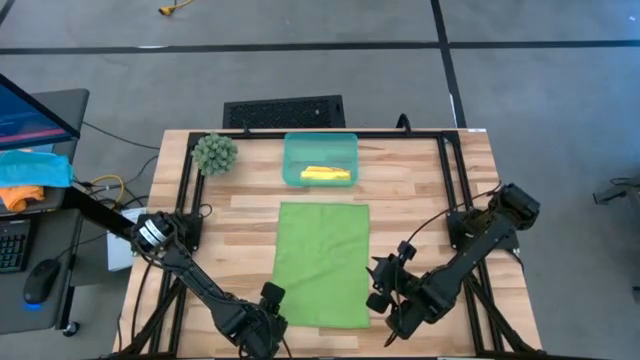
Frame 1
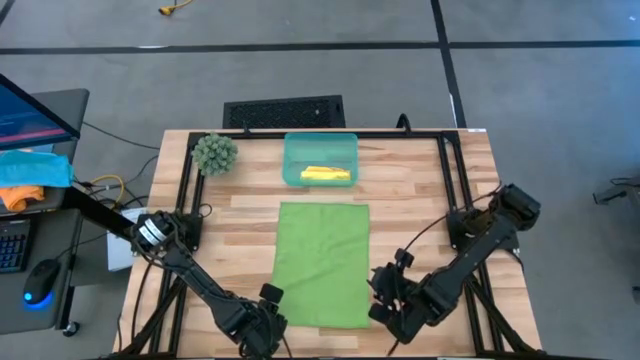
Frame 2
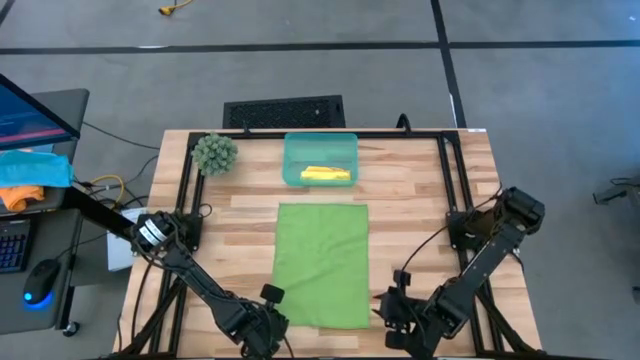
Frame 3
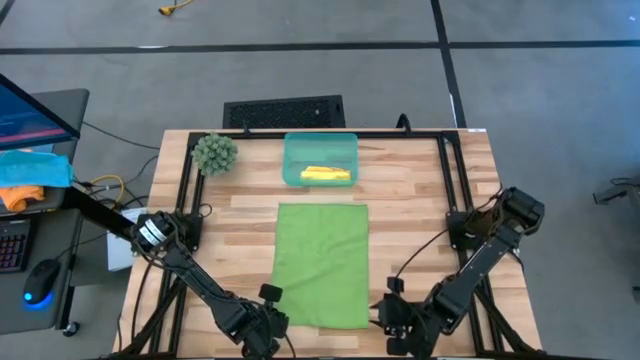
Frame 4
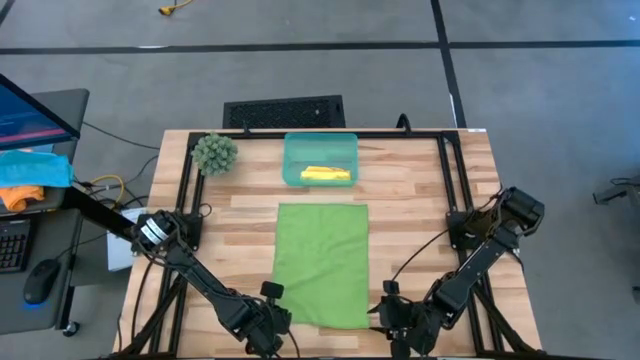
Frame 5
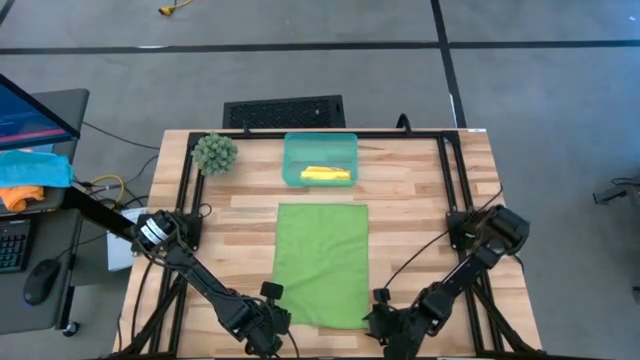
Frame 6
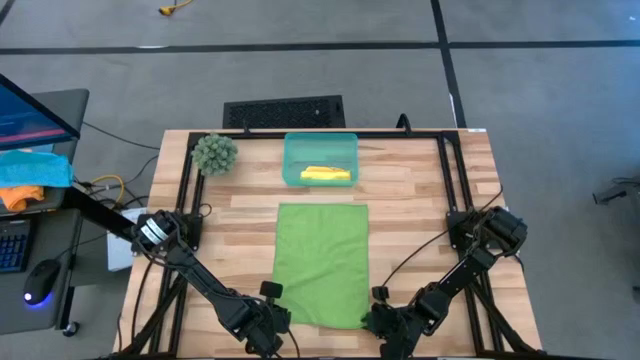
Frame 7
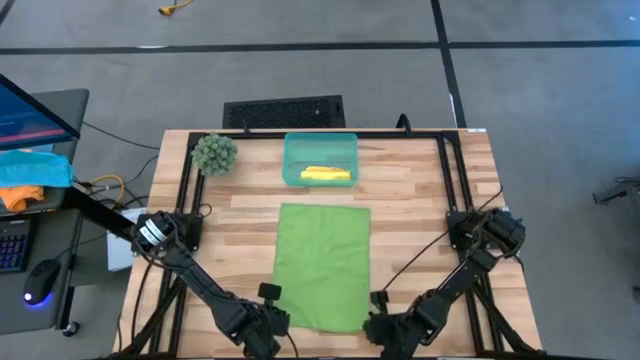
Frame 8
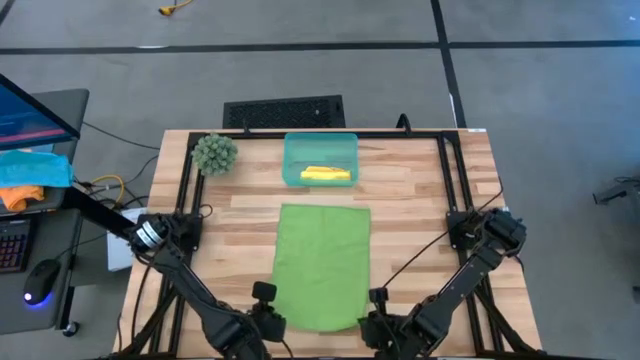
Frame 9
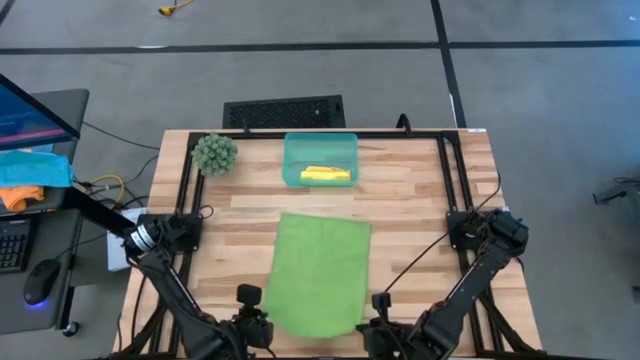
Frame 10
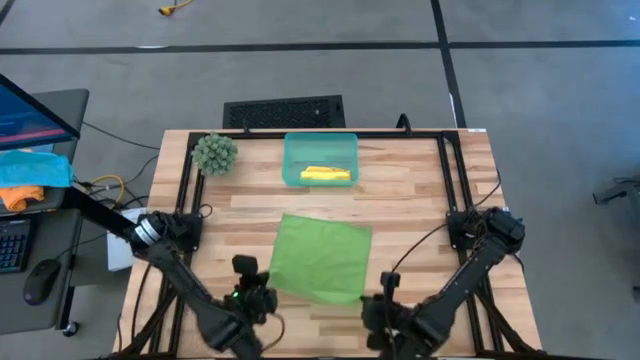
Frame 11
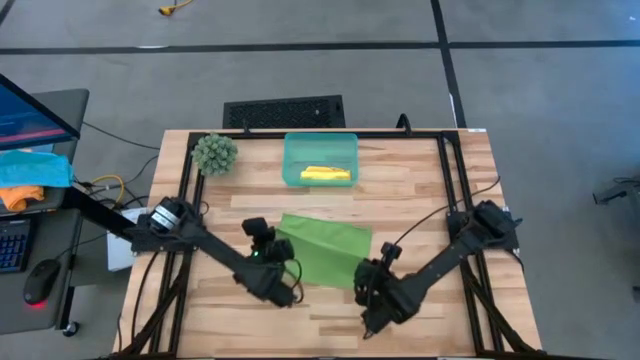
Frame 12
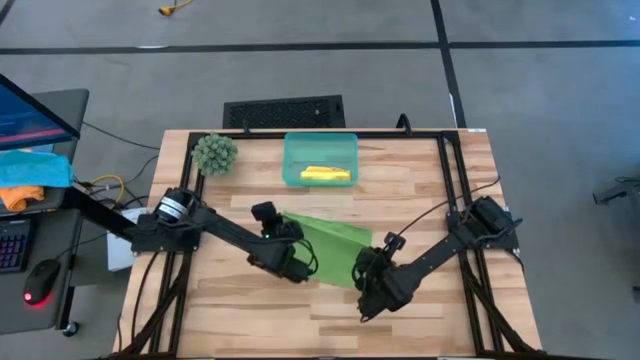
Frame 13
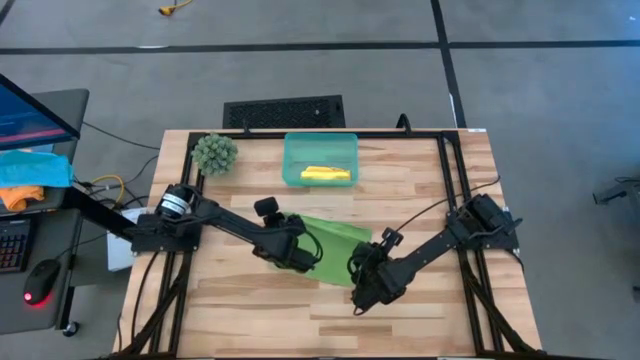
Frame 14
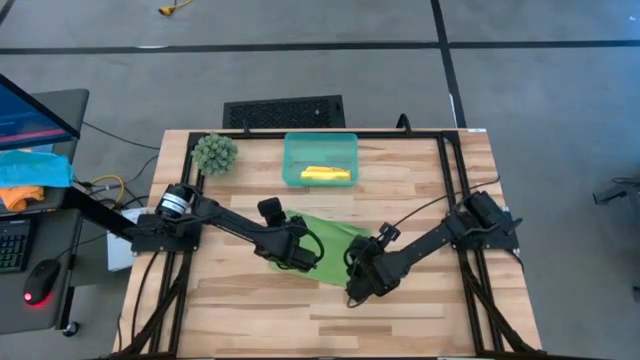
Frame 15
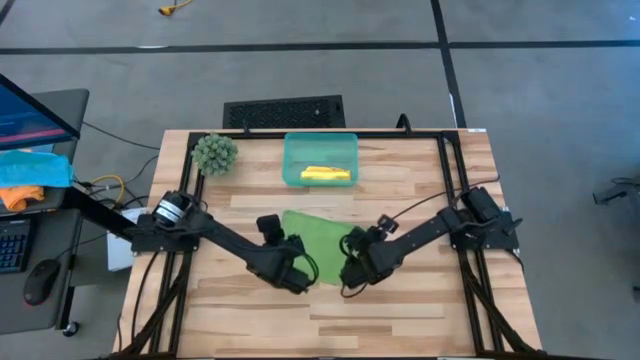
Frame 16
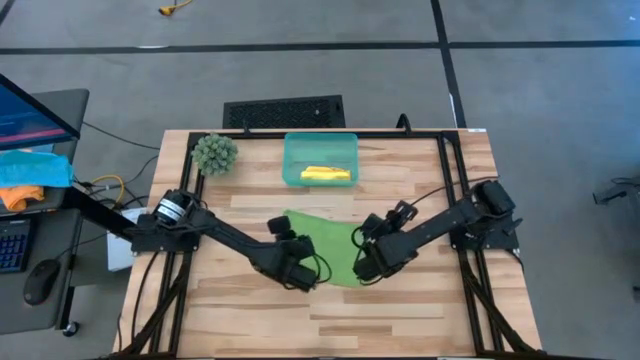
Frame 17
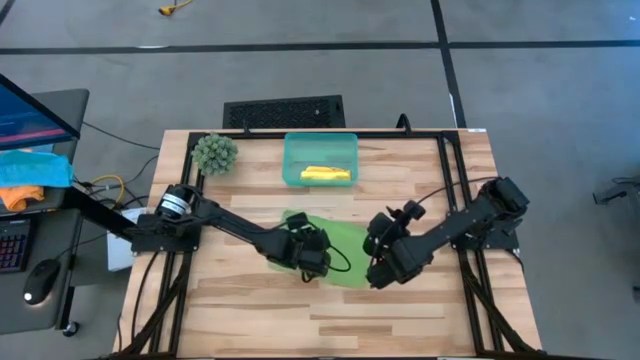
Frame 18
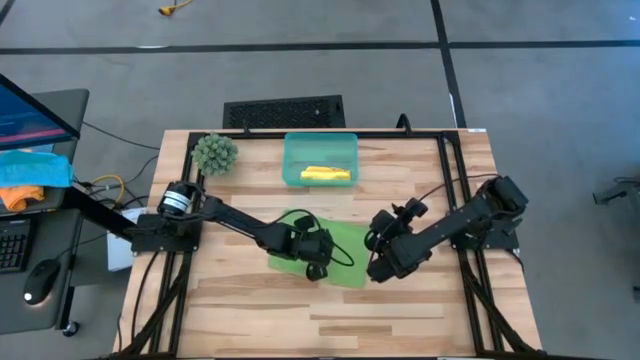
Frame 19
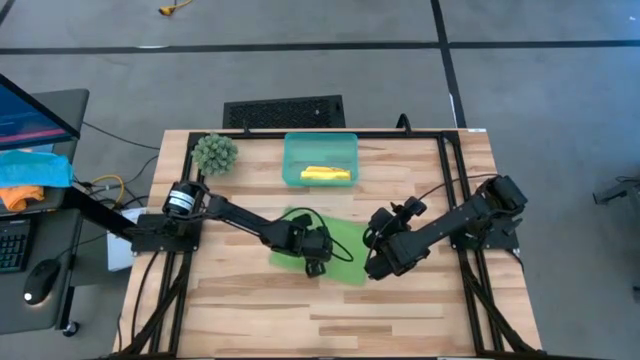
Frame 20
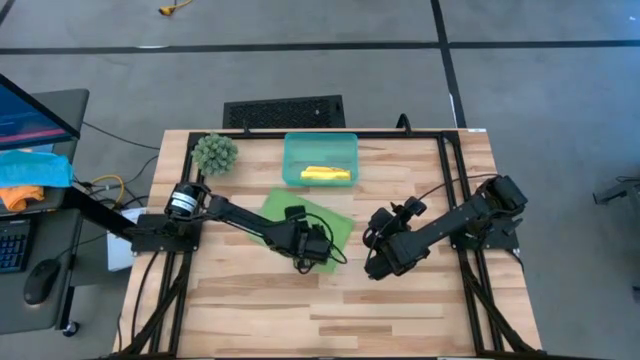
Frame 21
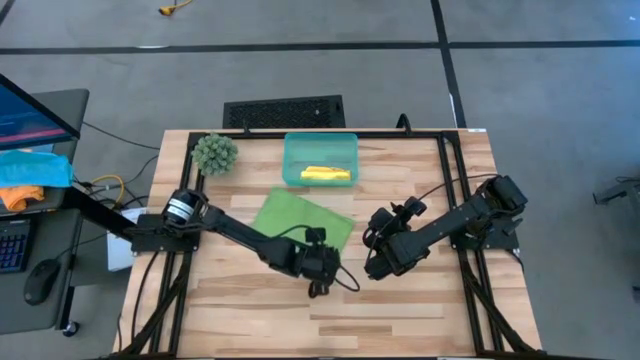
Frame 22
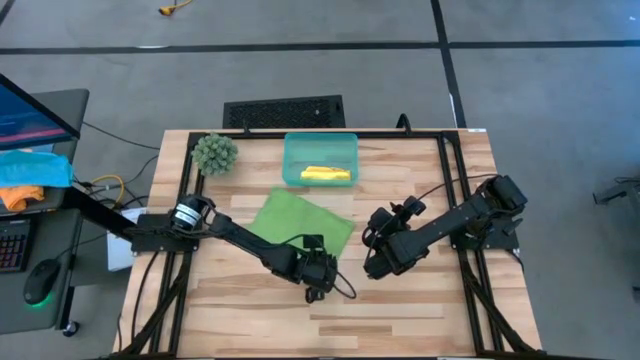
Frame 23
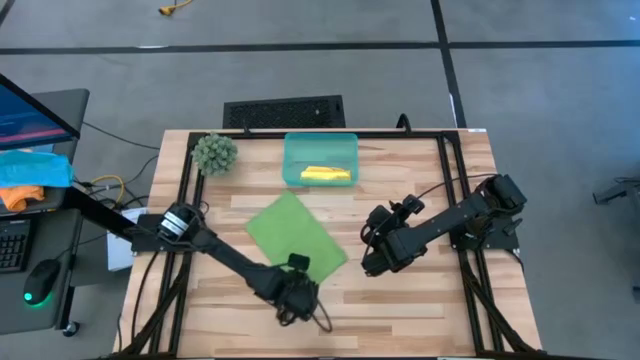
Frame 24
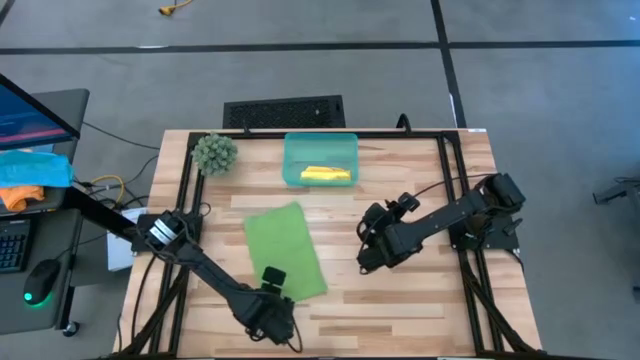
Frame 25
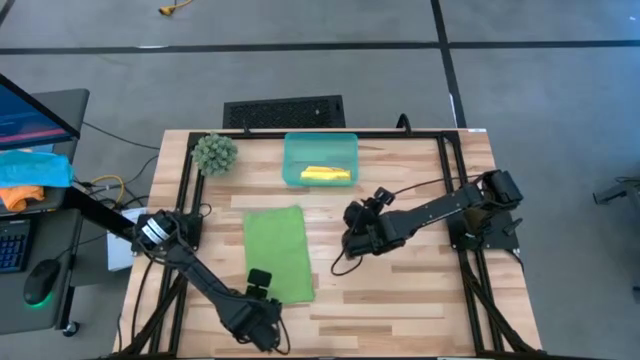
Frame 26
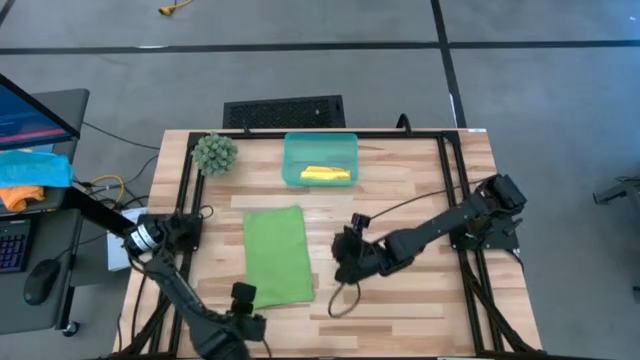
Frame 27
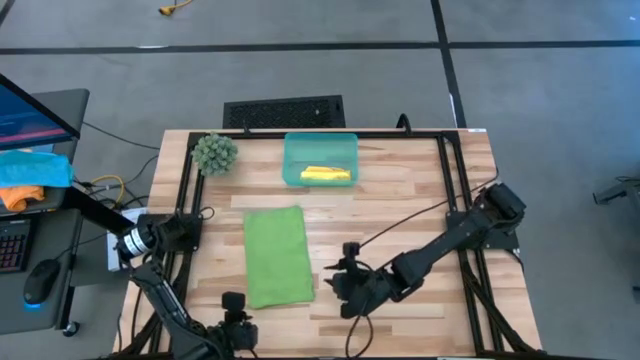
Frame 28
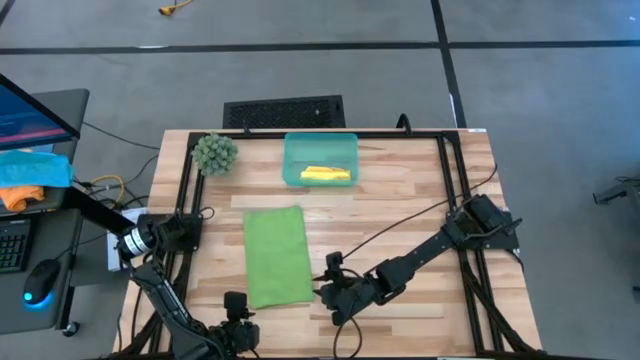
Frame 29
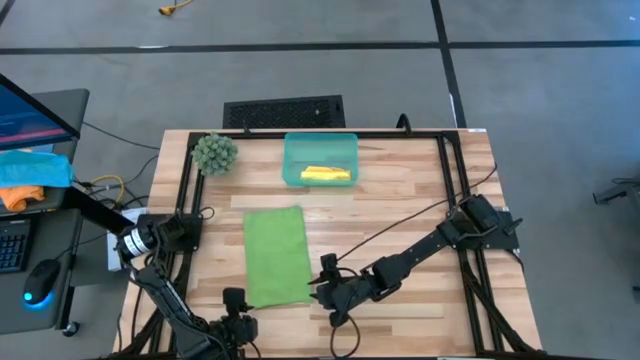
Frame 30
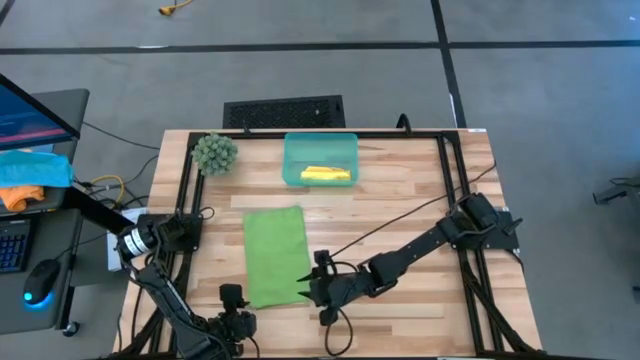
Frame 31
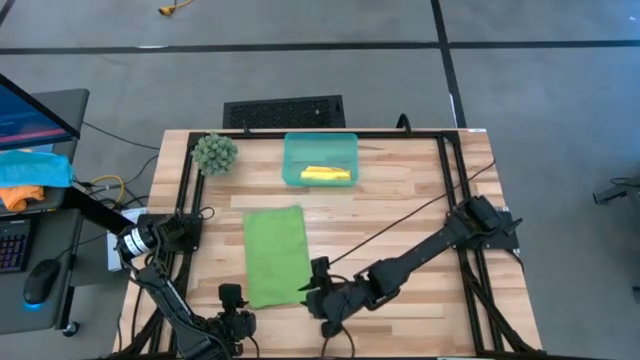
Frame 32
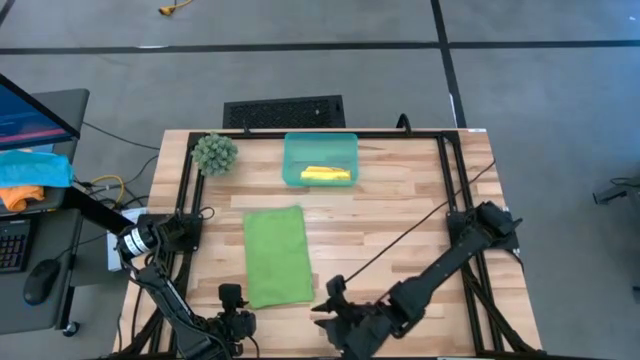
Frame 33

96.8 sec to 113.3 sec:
Task: Roll microfiber towels into tight, uniform cylinder then place into a basket
Fold the green microfiber cloth
